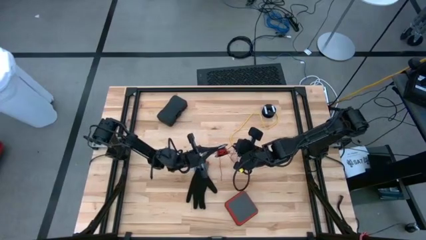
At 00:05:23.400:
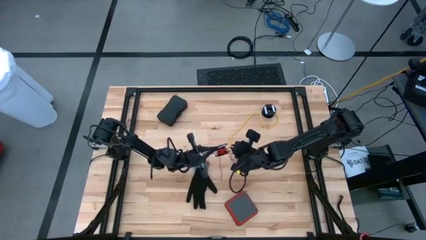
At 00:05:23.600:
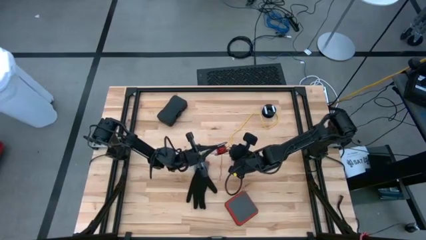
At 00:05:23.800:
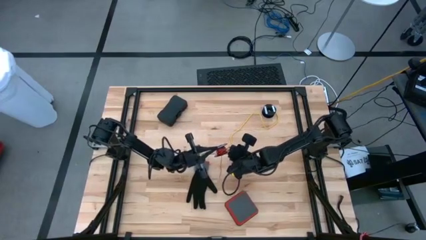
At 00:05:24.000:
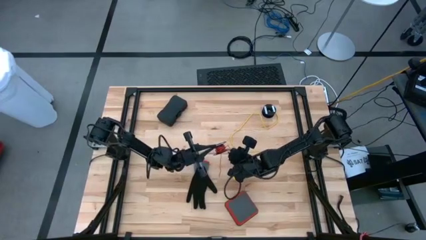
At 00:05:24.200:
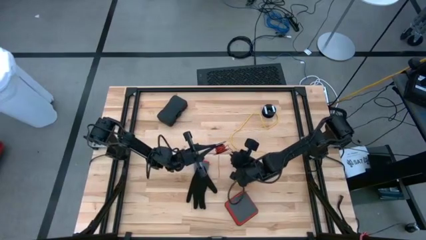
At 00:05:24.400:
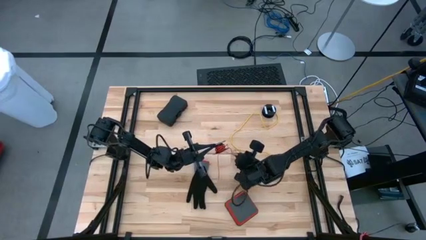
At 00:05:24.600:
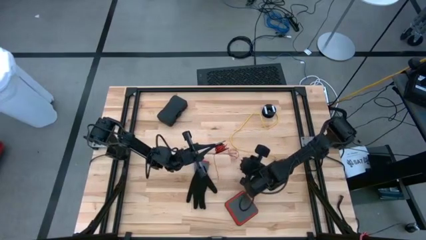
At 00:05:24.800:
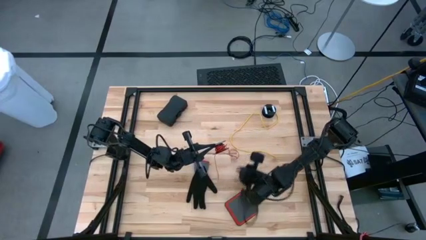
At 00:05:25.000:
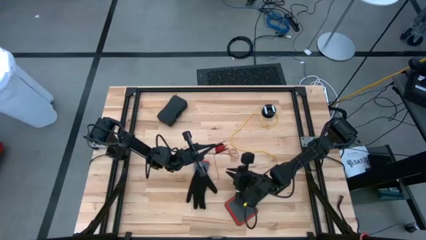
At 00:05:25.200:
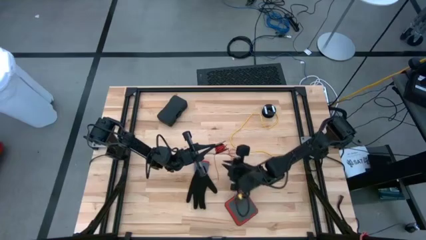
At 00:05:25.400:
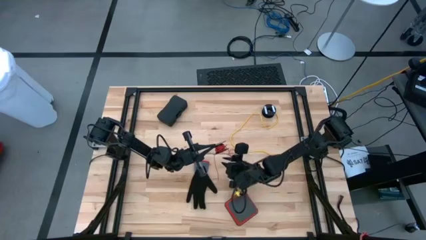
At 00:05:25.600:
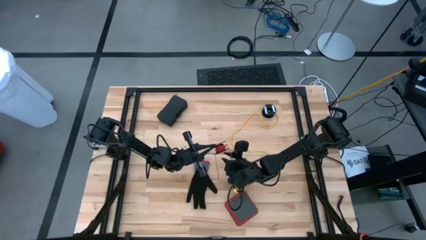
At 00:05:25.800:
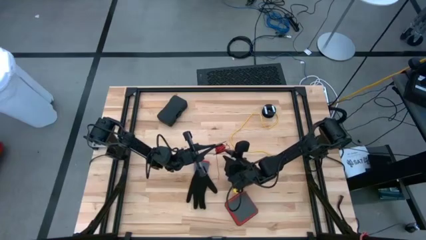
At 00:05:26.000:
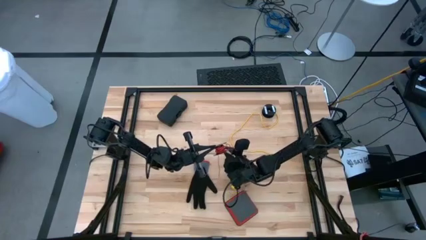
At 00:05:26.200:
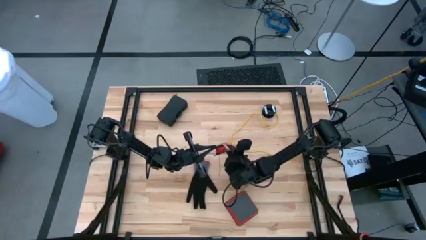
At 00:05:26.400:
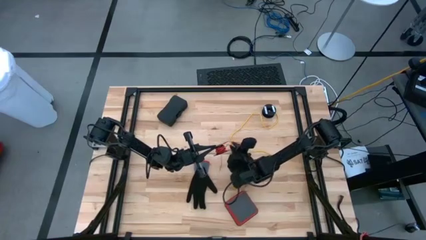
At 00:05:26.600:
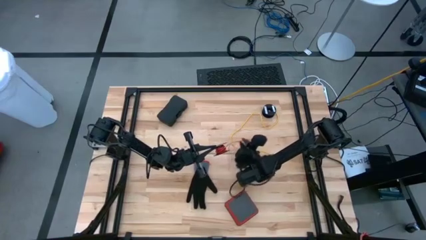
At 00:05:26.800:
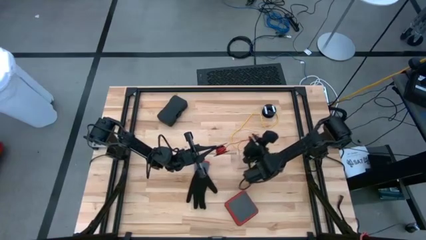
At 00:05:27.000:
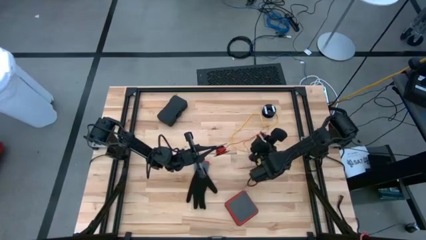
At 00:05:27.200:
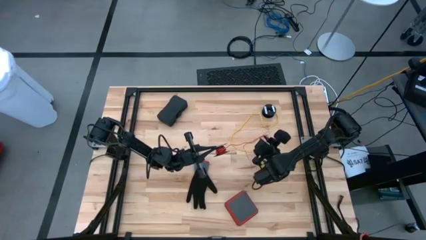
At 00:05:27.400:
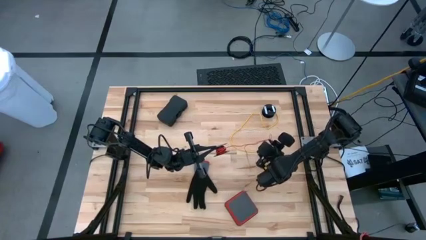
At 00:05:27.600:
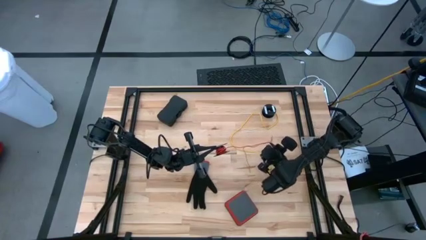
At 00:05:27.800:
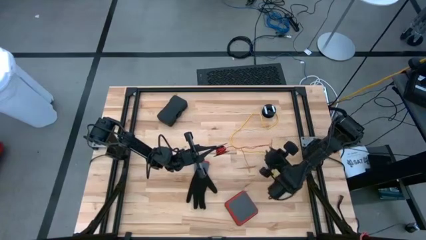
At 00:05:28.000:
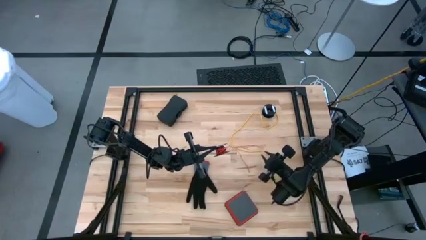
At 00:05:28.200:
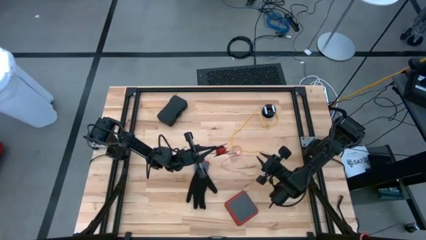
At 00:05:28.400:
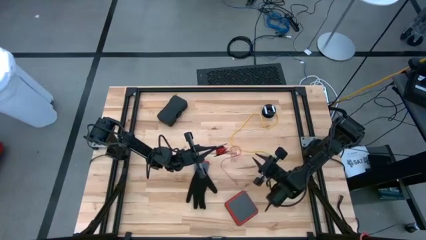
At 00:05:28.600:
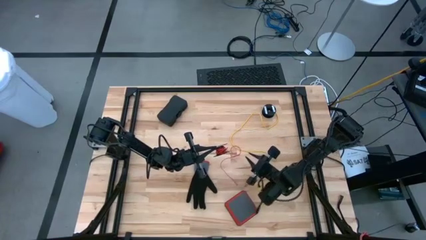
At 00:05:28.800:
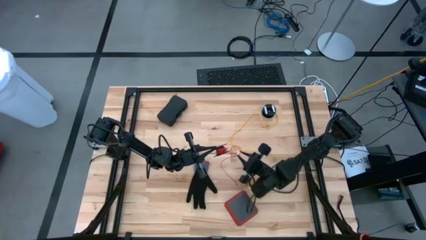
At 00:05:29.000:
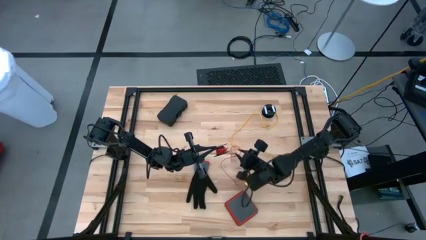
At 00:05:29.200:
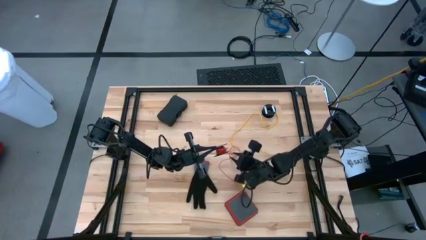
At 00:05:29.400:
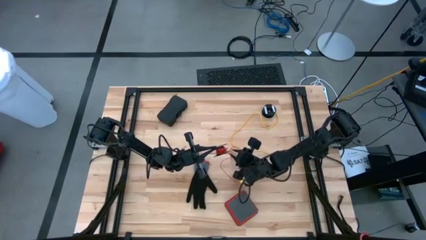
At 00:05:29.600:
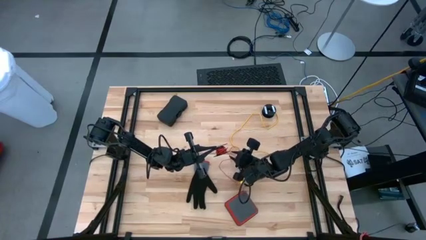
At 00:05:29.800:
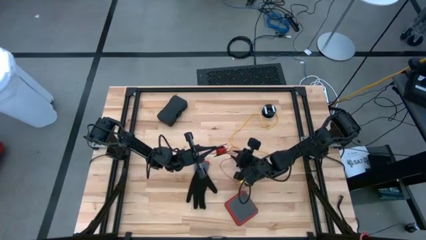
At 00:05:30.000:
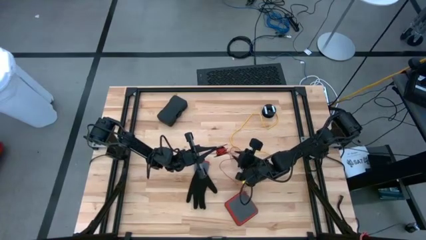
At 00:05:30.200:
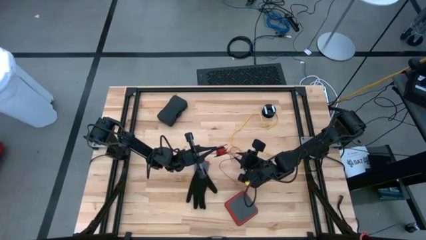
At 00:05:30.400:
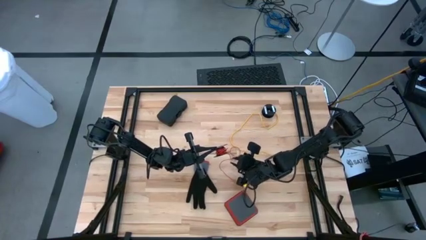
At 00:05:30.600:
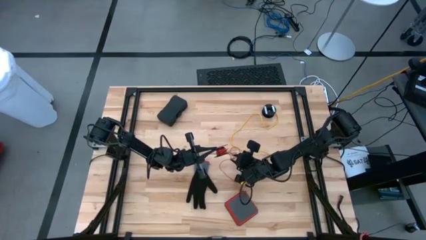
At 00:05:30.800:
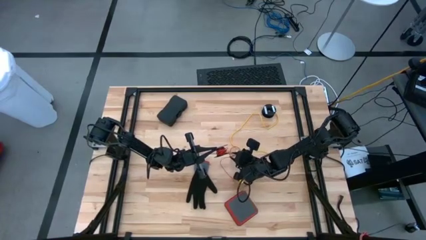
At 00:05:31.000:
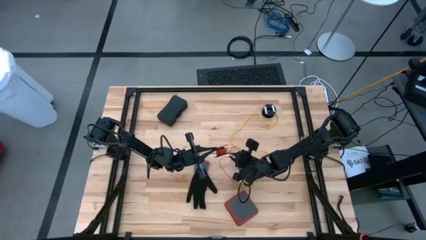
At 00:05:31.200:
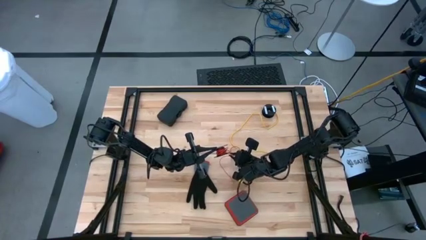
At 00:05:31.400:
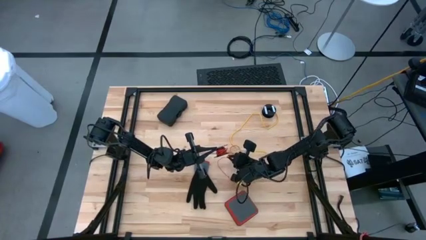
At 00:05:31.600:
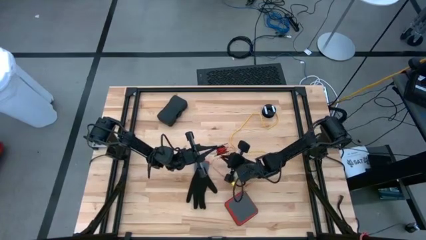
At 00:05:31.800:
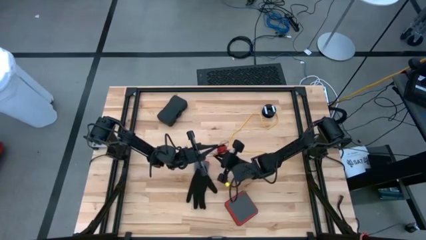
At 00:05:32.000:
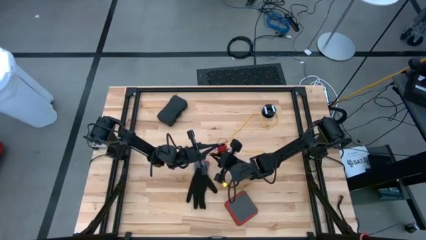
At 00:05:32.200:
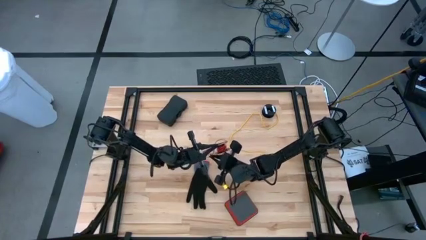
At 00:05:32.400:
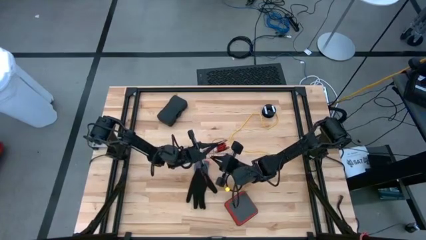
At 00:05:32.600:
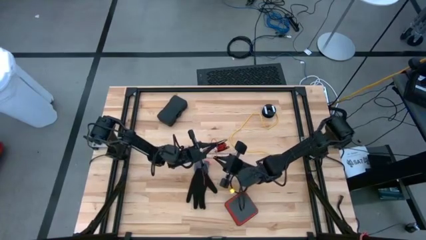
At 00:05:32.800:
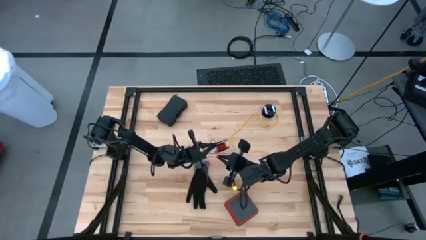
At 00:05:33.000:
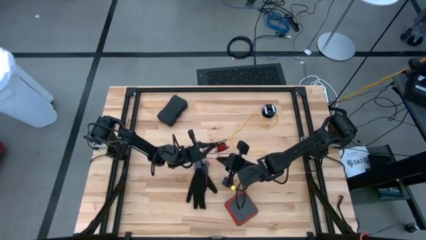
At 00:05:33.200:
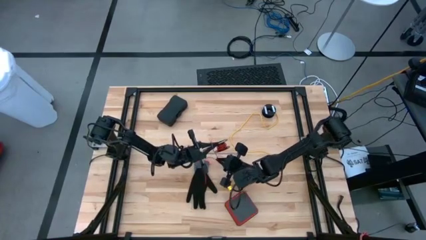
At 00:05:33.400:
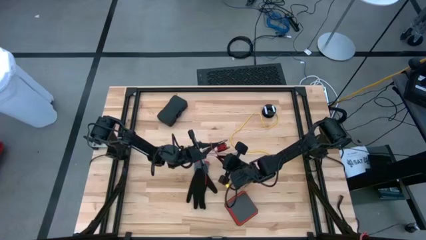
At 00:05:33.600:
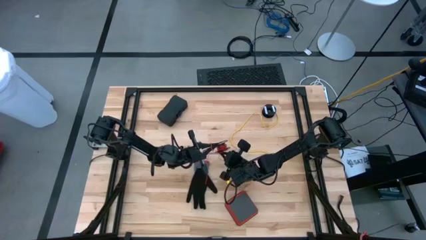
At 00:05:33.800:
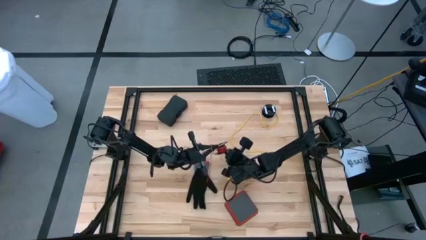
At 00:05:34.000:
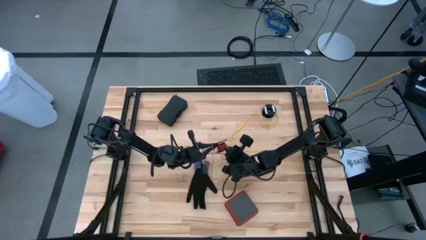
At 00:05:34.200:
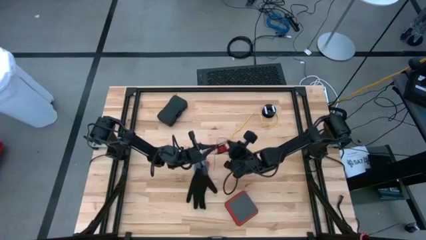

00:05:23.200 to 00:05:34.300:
Task: Coil cords
Coil the red wire onto the black spool

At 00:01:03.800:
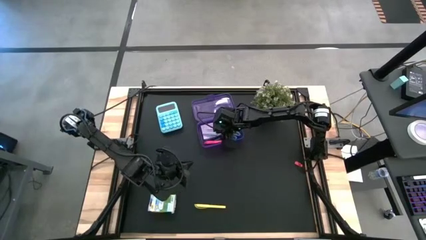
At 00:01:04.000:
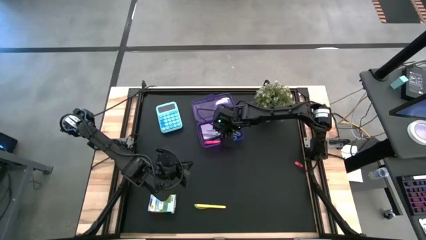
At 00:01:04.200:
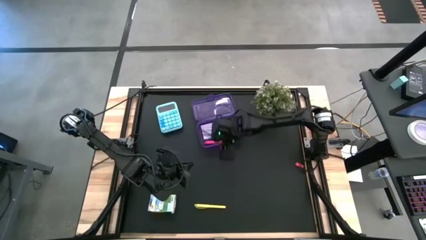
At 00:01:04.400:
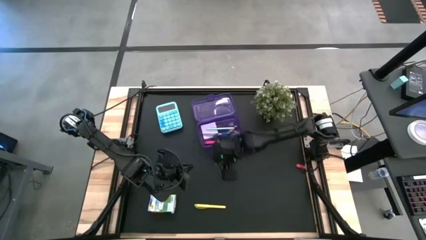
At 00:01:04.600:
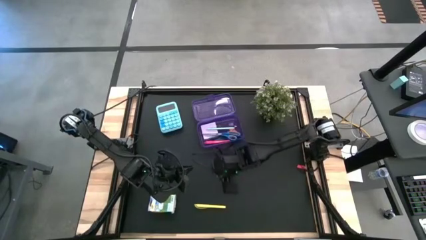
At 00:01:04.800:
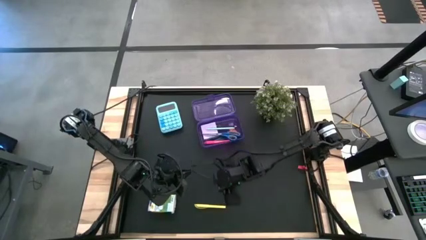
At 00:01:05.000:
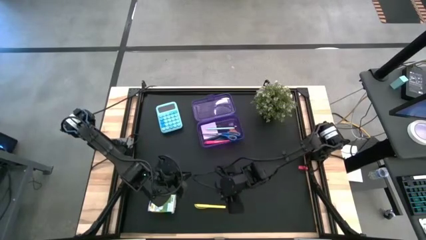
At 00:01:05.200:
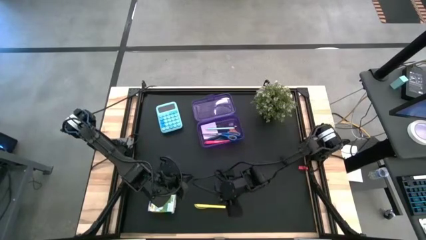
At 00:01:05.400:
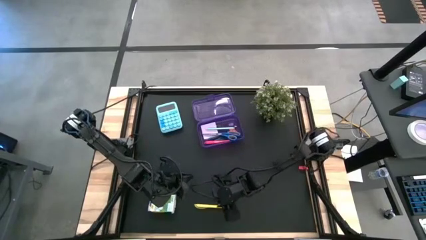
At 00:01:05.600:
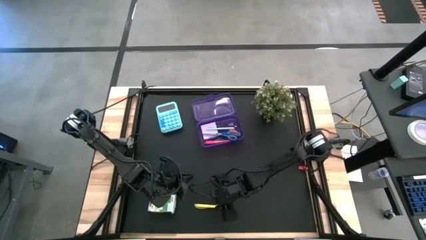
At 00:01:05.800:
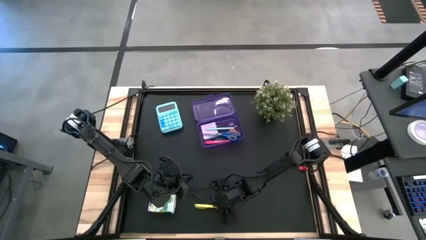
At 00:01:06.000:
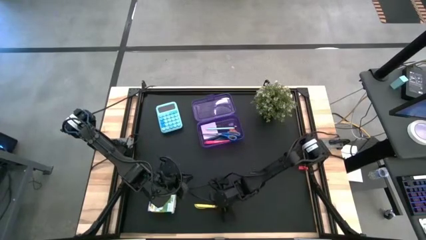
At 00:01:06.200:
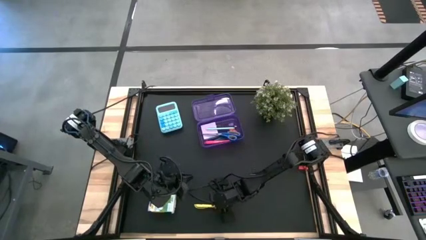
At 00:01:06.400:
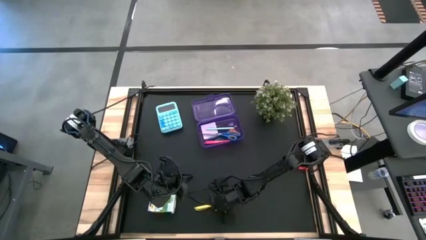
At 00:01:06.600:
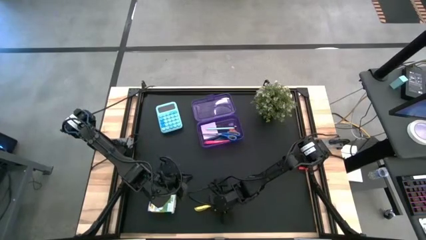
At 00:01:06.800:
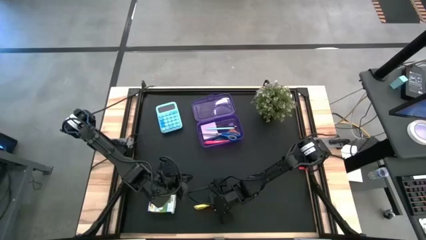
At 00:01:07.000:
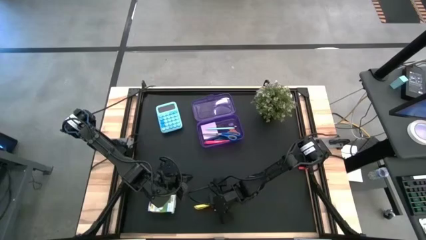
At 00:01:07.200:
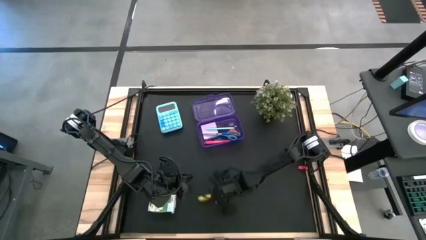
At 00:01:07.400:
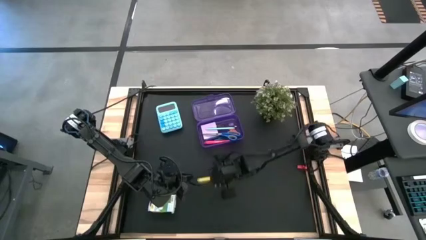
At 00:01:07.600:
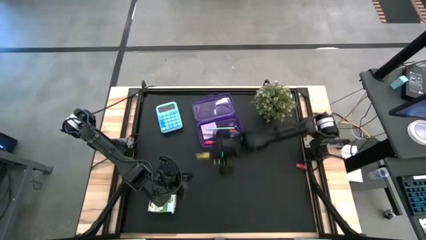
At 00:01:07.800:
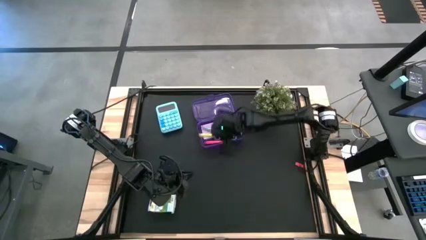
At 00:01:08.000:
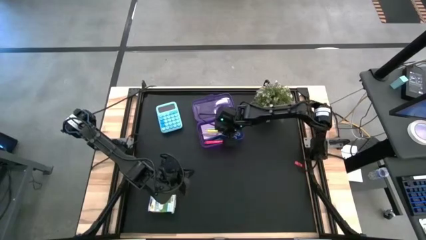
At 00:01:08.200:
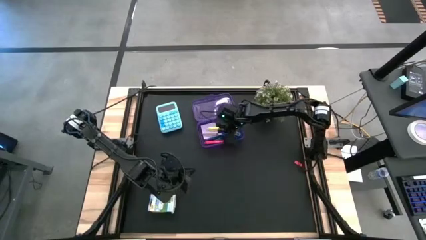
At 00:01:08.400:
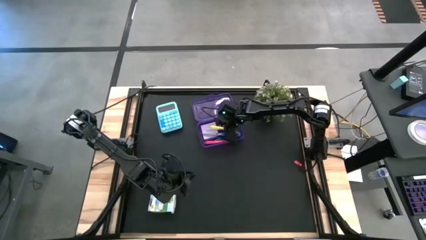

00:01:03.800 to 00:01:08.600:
Task: Pack school essentials
Put the yellow pen into the purple supply box
